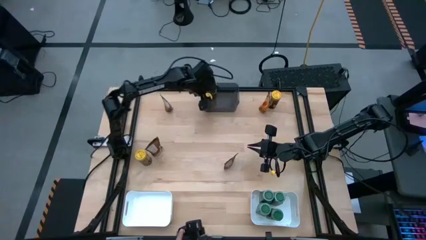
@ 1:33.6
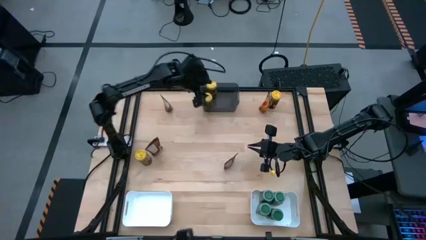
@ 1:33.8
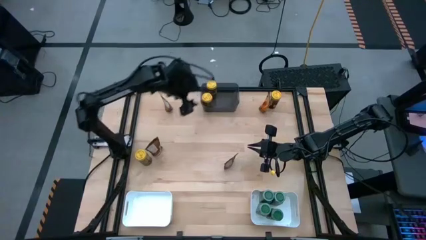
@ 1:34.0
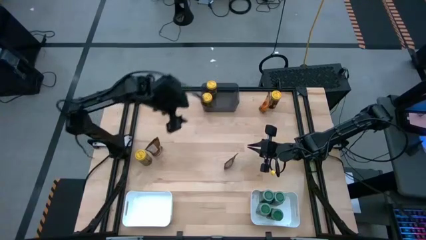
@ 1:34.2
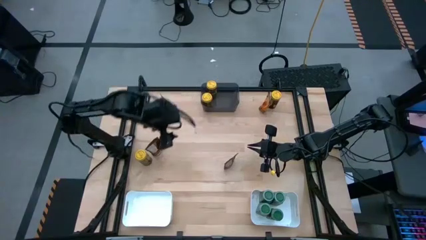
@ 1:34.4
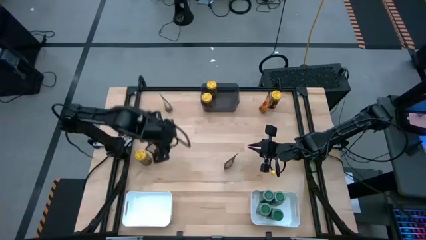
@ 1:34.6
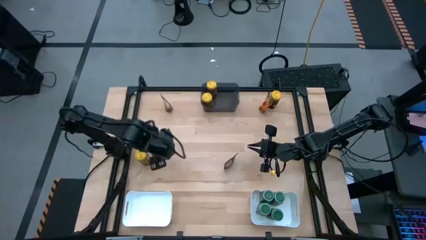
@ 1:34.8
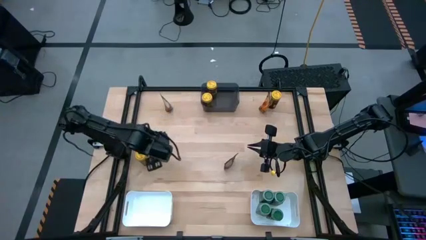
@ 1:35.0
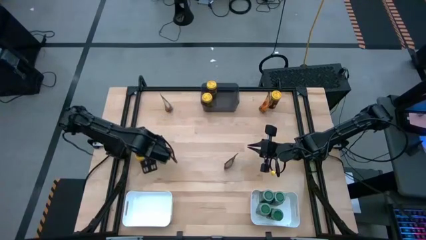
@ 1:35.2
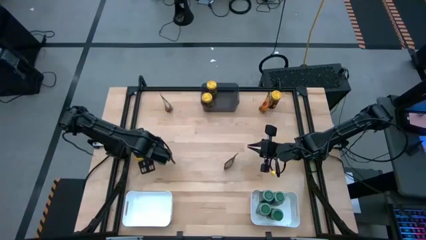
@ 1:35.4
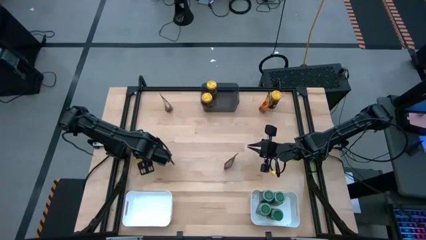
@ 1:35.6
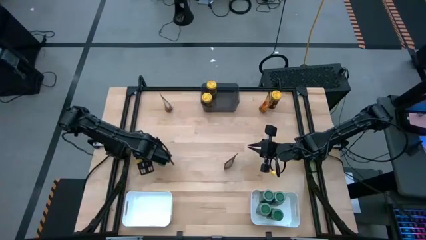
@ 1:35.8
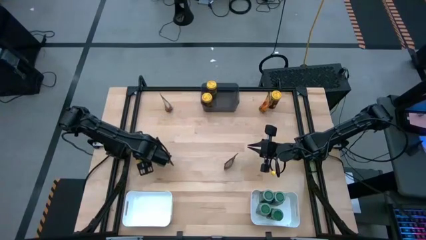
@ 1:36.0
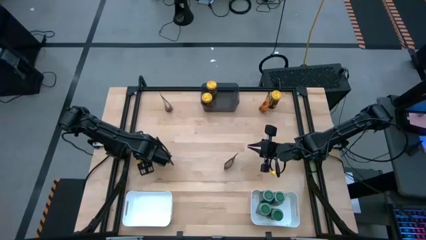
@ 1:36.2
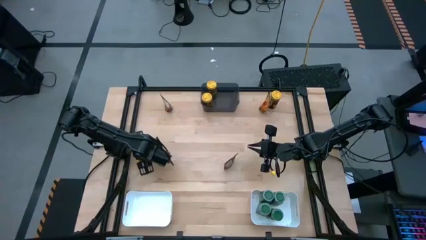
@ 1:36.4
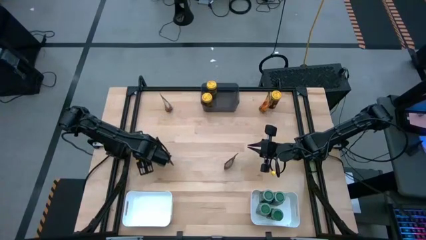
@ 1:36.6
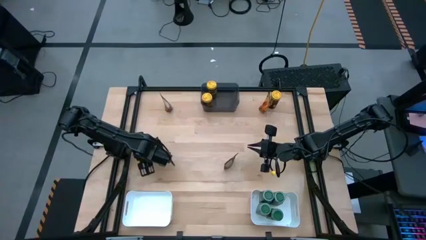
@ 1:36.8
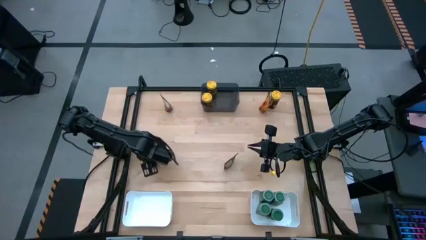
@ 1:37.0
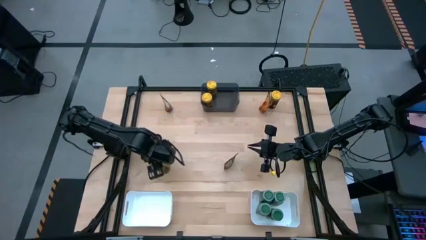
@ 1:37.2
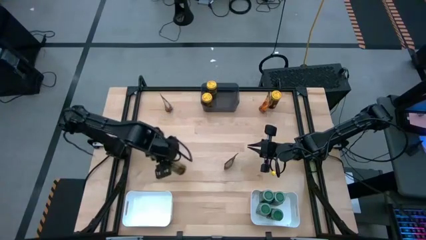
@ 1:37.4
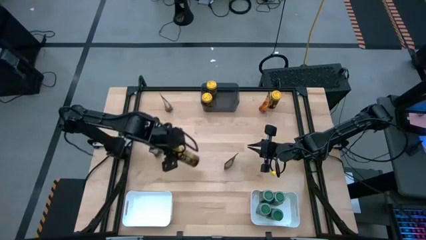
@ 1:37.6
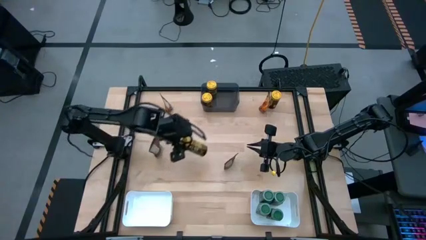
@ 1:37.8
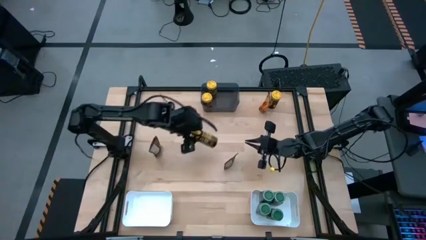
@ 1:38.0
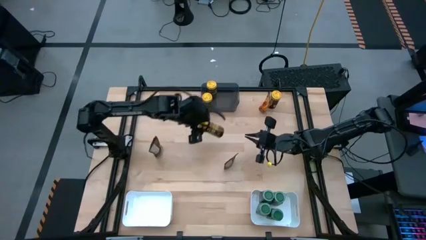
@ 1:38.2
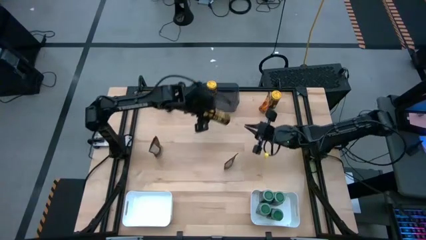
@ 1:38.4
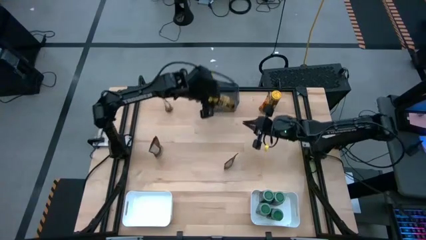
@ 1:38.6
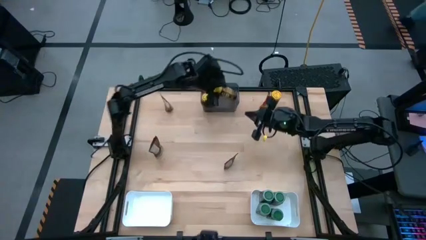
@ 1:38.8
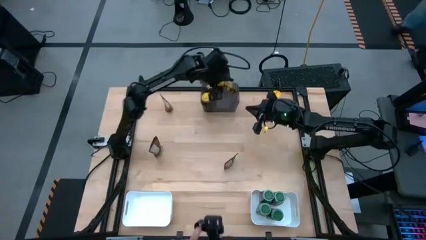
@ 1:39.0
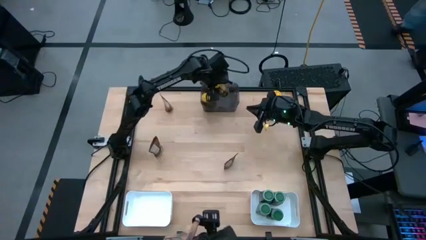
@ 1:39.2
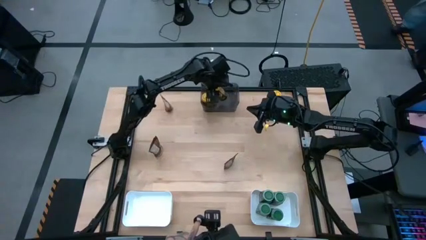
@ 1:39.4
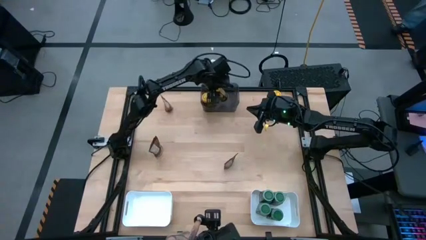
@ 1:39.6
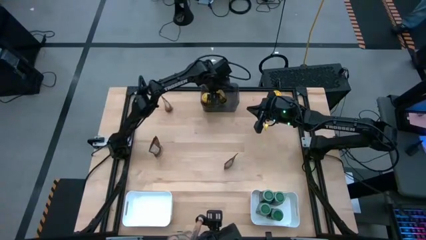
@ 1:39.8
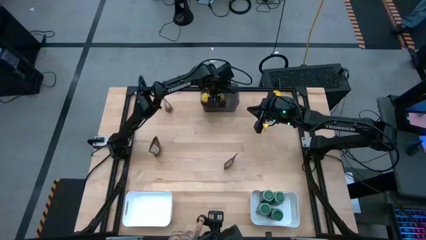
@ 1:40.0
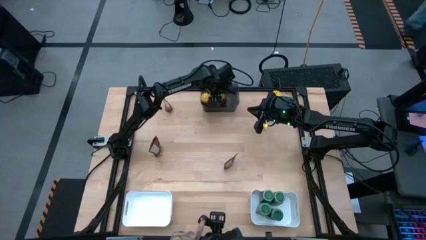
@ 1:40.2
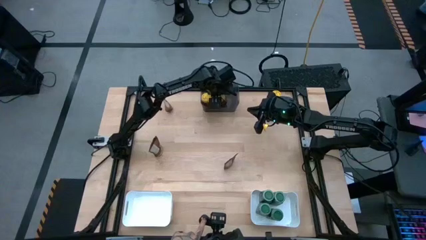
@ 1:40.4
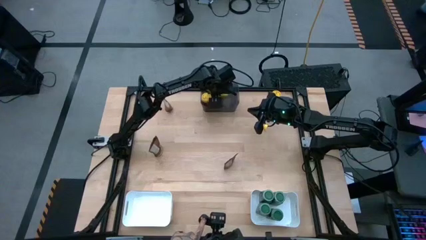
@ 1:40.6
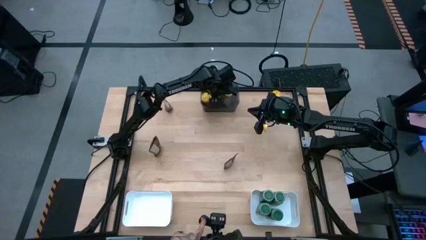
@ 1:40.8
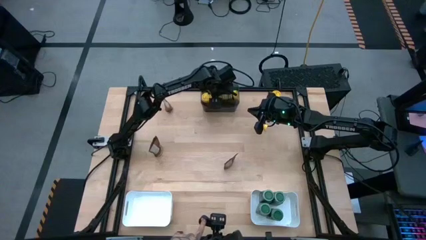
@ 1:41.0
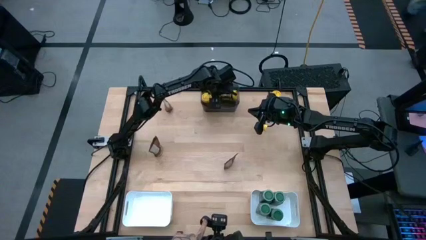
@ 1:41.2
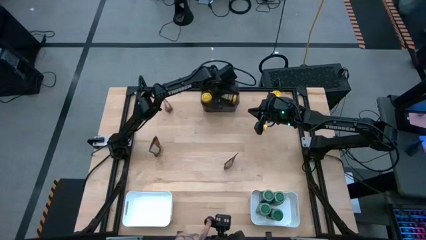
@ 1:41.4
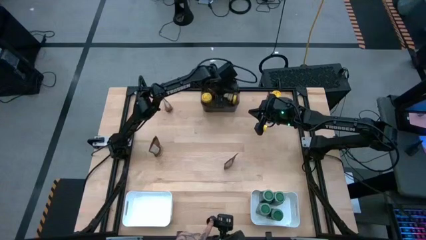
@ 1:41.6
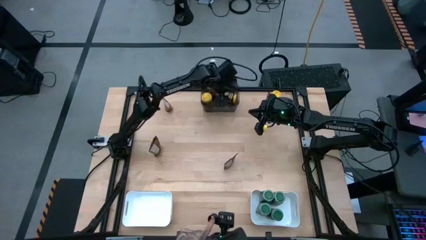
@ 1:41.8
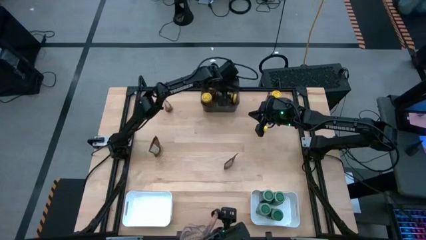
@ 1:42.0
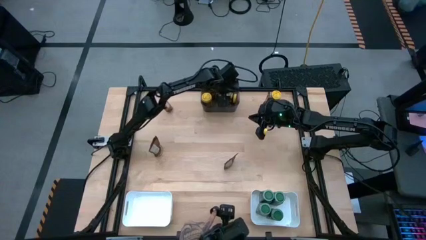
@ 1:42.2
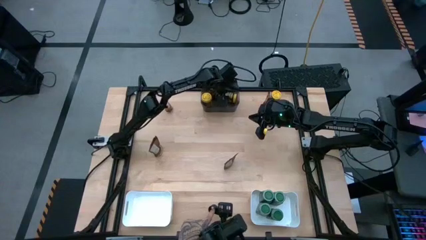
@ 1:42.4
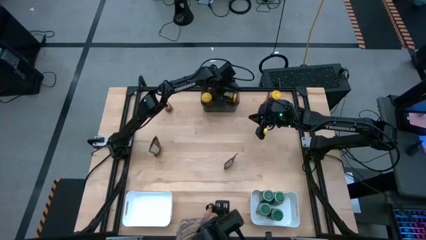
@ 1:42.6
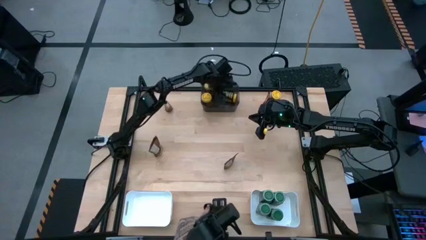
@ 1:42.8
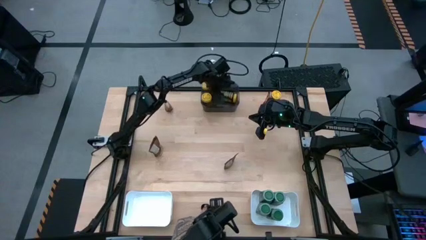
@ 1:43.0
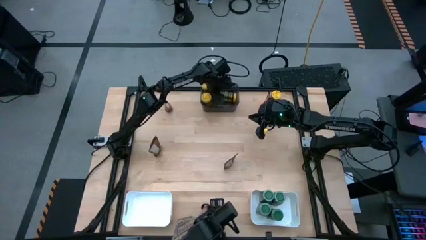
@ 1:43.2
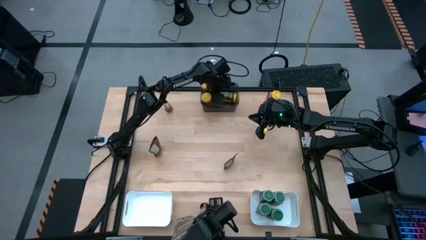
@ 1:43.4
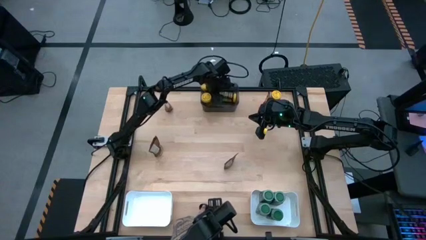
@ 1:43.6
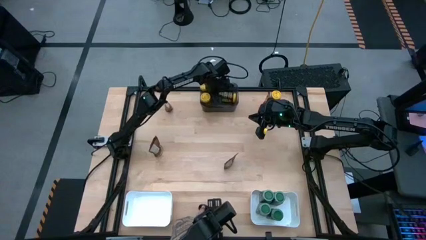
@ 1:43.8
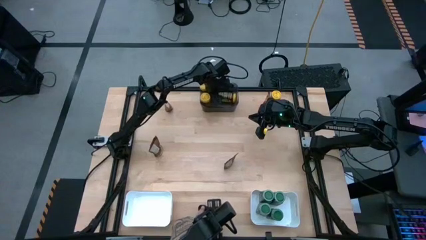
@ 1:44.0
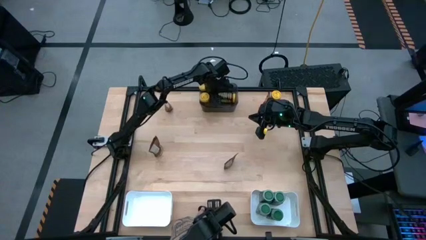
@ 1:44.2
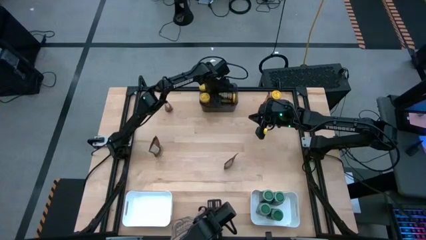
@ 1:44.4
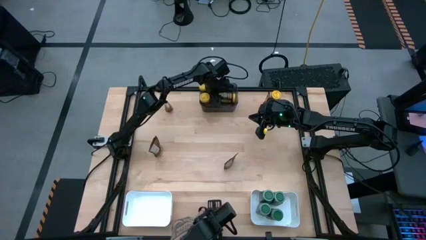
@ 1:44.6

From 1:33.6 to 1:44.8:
Task: Sort spices by type
Put the bottom left yellow seasoning bottle into the gray bin

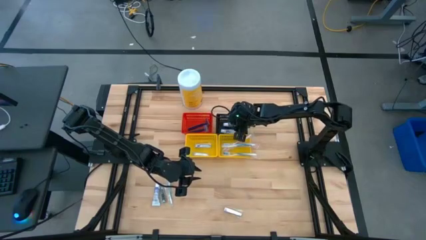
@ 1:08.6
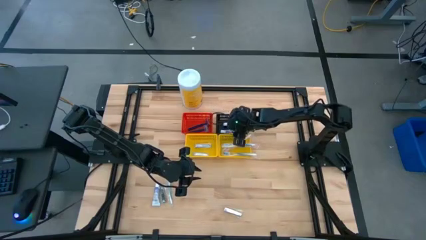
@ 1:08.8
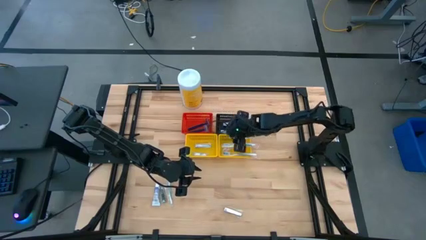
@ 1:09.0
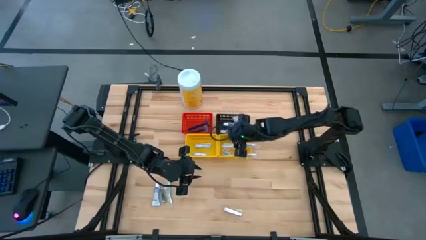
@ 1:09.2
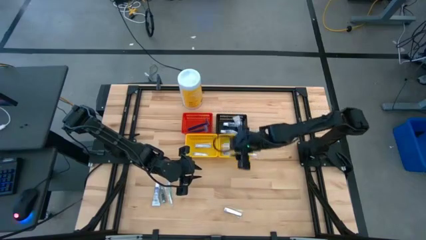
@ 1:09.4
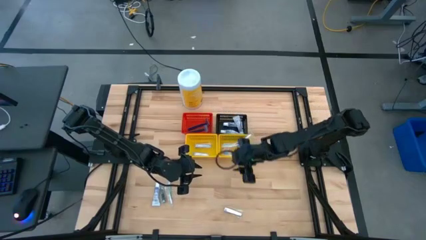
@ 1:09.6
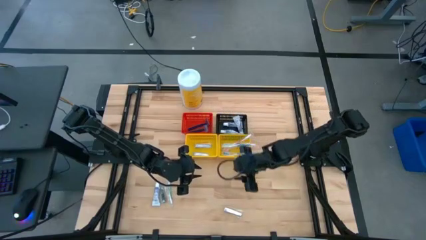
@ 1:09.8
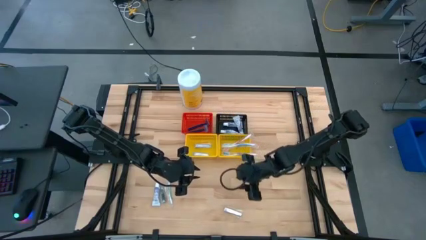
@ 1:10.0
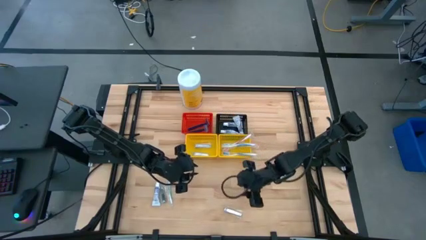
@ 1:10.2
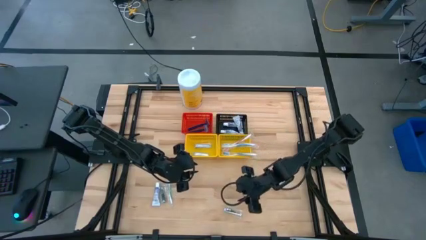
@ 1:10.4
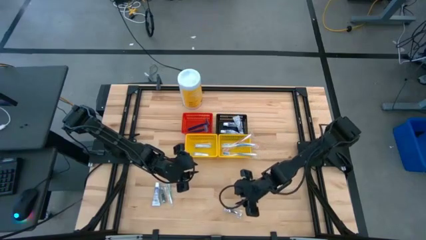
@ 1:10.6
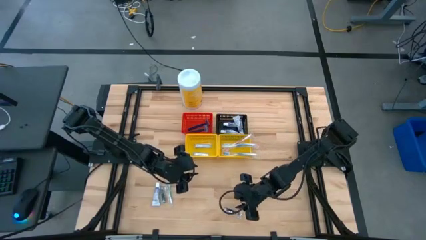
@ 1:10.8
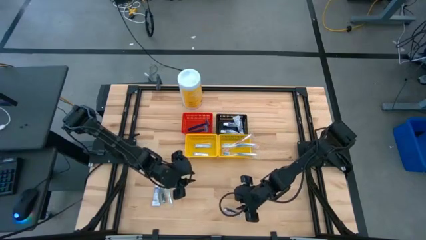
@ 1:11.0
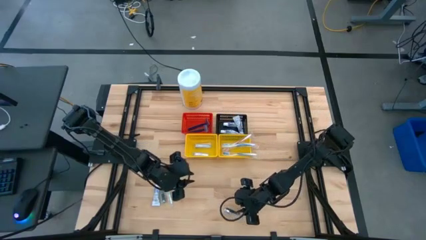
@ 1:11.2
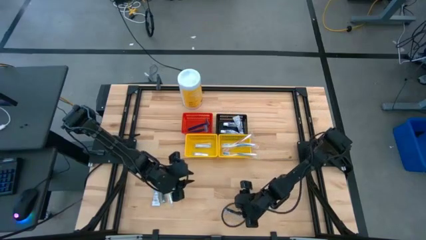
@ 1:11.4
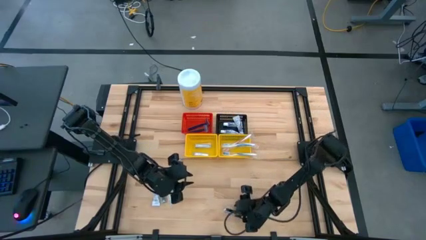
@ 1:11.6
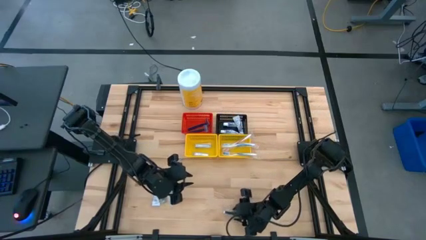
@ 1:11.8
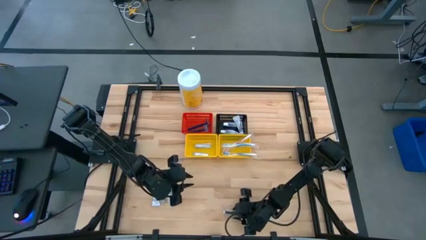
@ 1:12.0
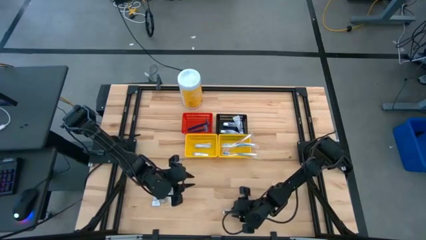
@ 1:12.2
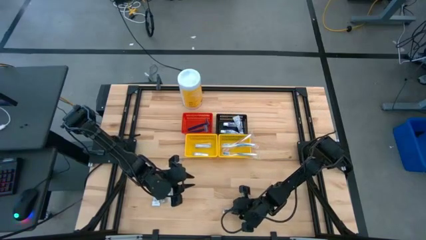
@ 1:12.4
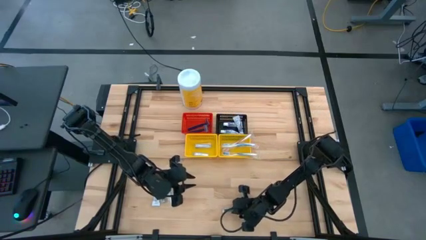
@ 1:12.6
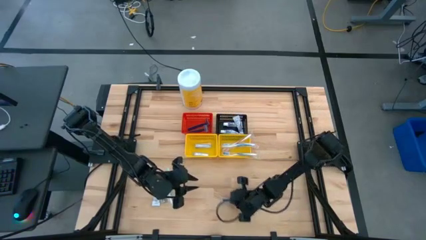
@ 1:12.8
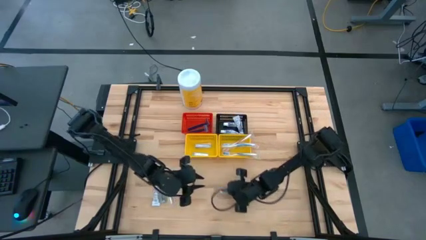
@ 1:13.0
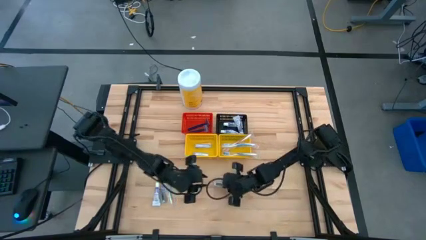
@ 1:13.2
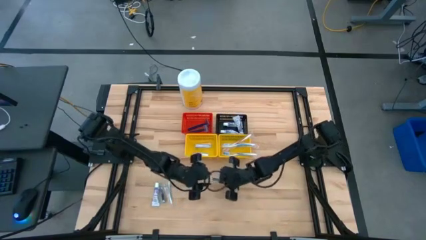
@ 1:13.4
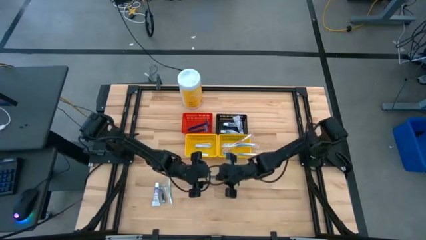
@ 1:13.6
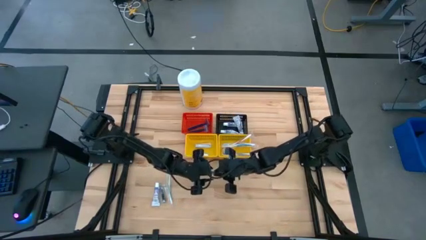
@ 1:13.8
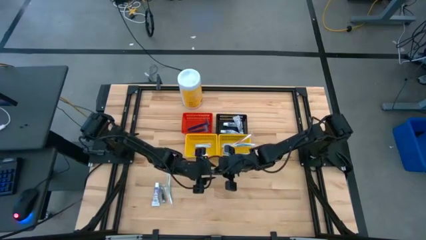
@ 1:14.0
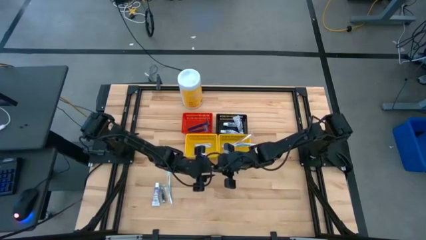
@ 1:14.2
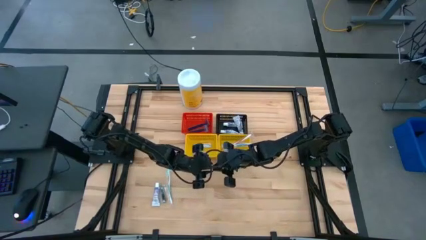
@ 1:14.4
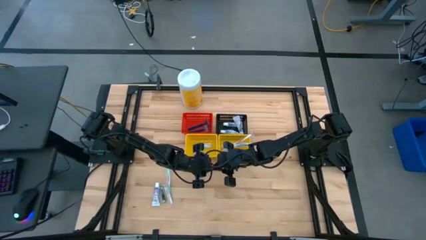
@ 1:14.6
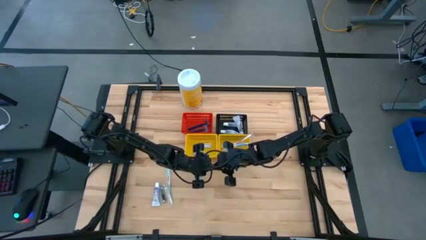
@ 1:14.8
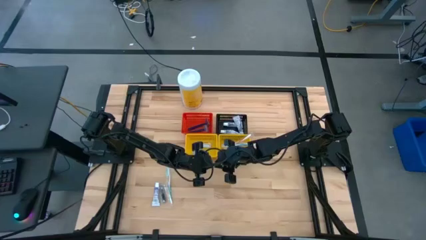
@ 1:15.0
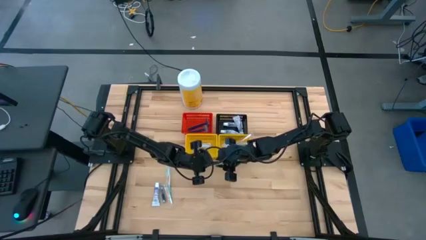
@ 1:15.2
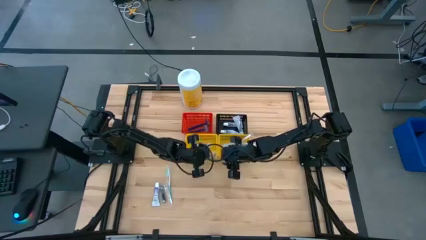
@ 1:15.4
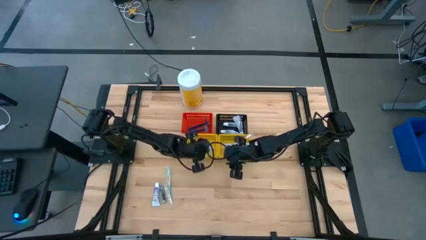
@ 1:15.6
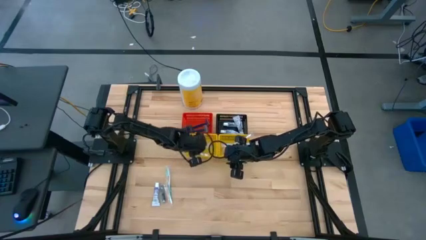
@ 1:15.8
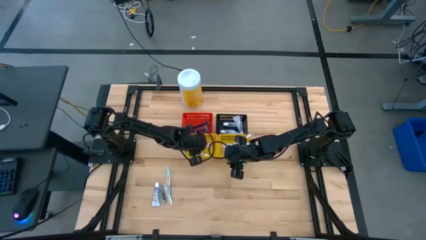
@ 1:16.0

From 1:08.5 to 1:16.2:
Task: Pick & Place Travel size toiletries
Put the silver nail cutter into the left yellow bin
